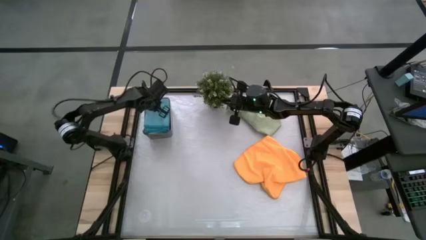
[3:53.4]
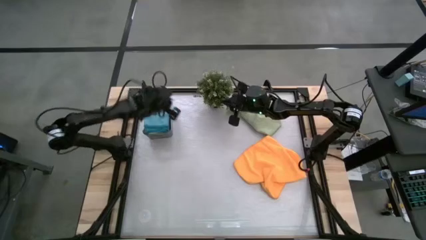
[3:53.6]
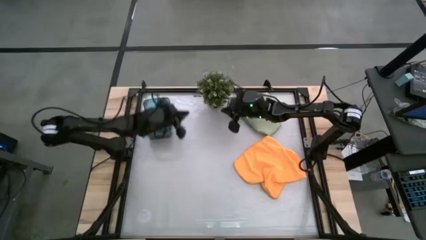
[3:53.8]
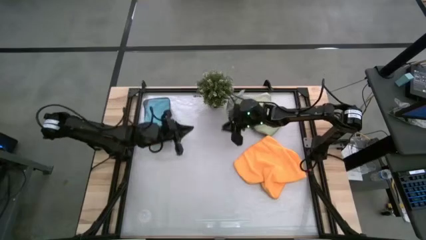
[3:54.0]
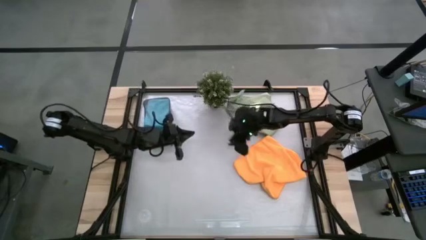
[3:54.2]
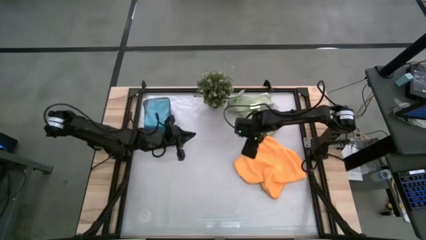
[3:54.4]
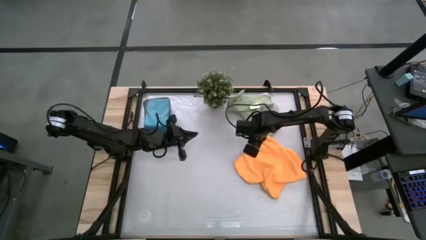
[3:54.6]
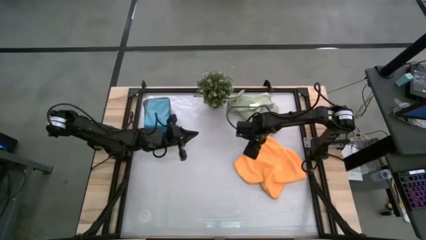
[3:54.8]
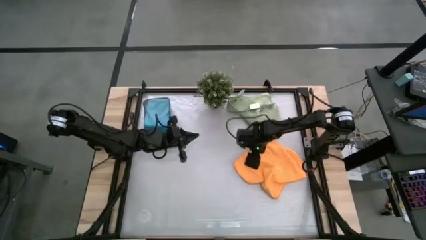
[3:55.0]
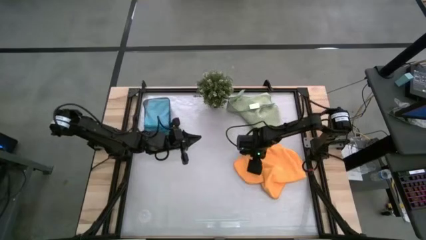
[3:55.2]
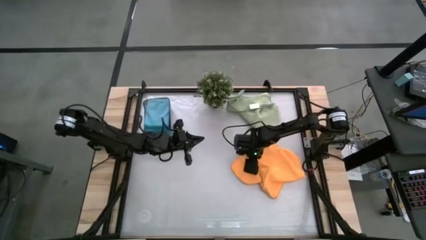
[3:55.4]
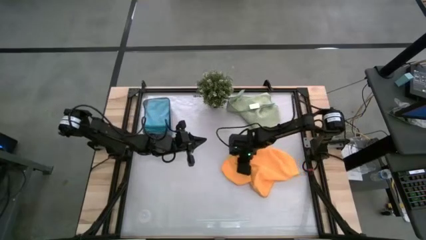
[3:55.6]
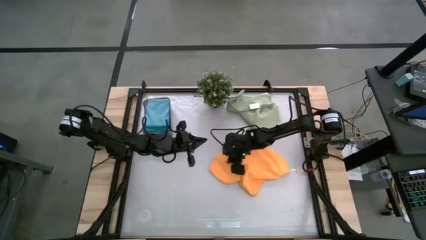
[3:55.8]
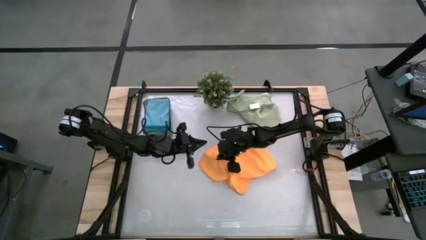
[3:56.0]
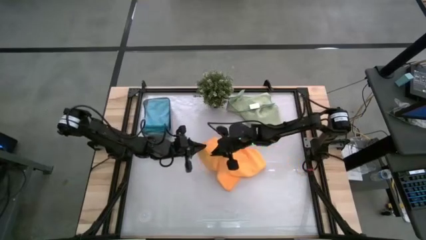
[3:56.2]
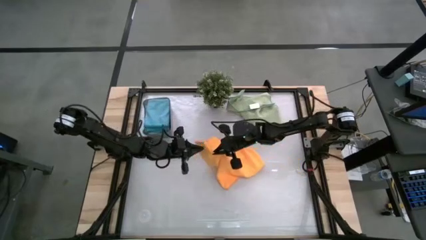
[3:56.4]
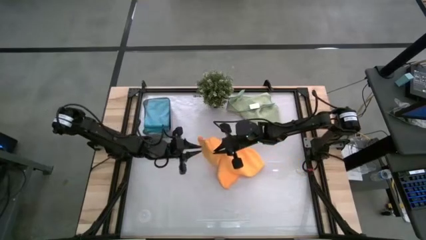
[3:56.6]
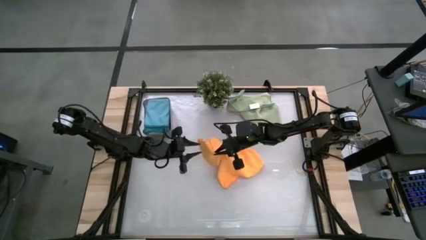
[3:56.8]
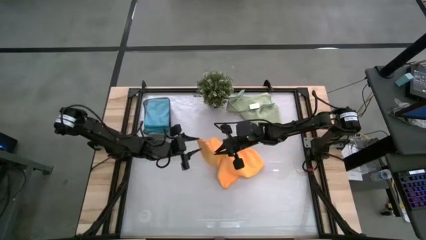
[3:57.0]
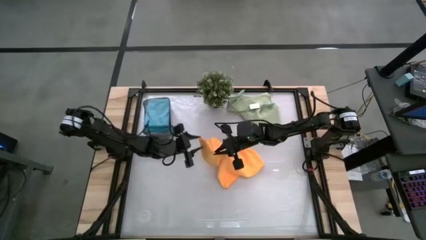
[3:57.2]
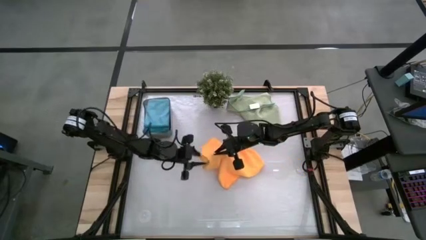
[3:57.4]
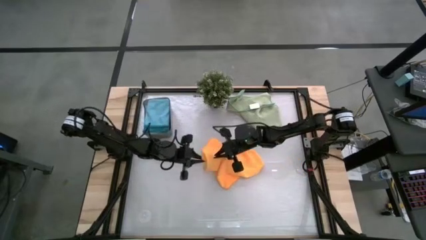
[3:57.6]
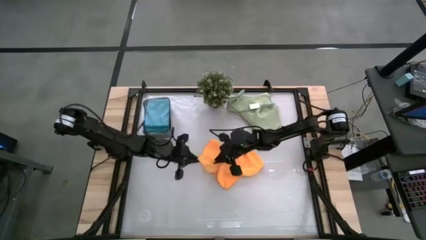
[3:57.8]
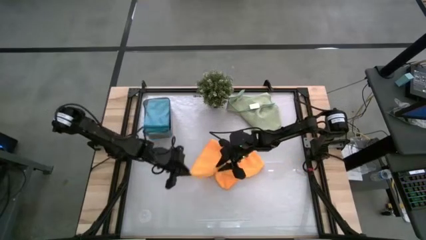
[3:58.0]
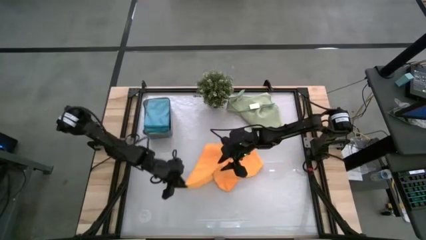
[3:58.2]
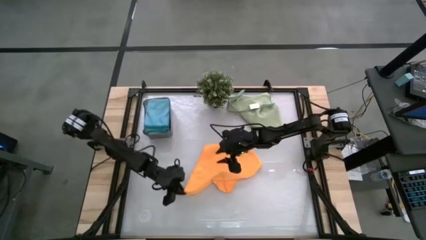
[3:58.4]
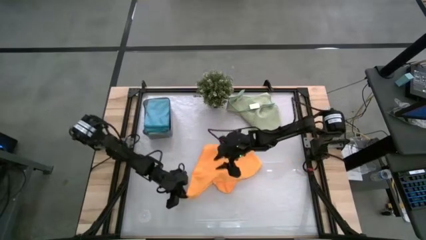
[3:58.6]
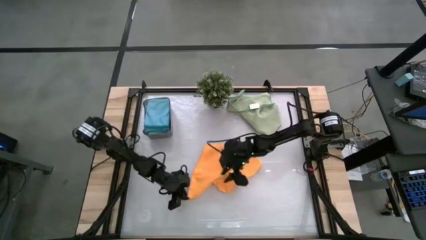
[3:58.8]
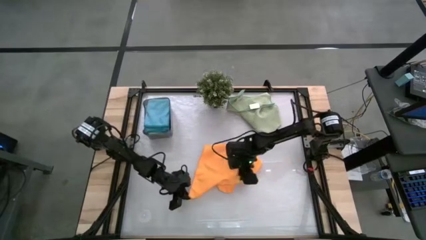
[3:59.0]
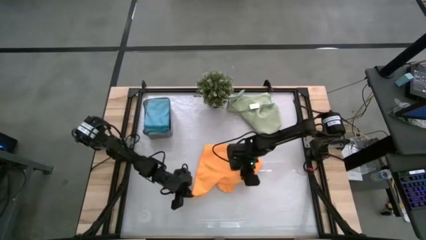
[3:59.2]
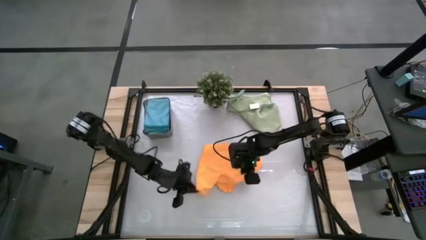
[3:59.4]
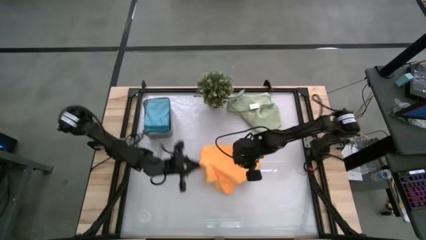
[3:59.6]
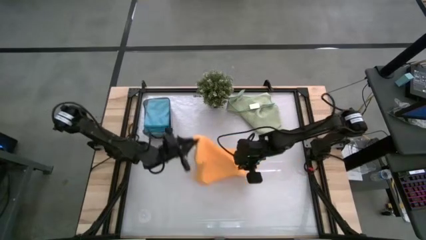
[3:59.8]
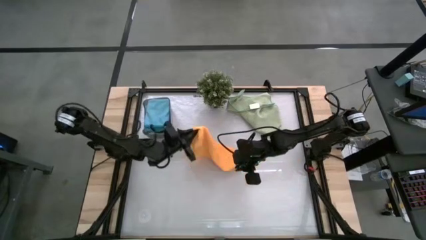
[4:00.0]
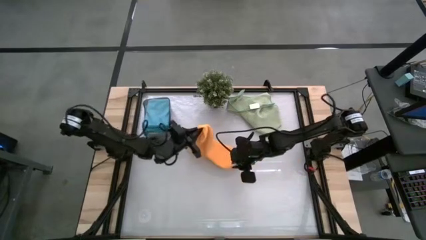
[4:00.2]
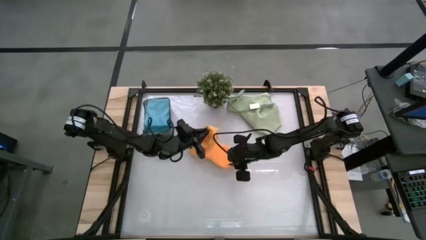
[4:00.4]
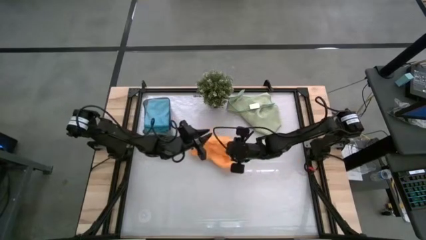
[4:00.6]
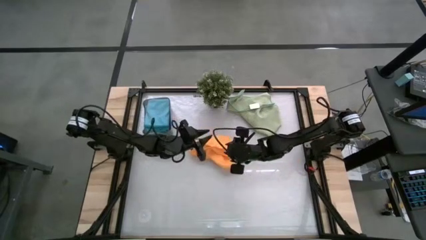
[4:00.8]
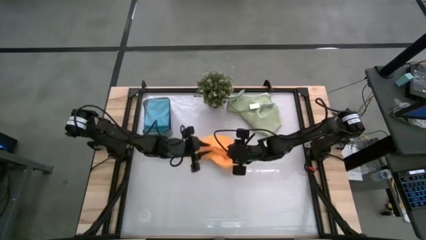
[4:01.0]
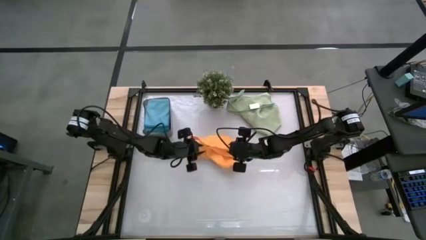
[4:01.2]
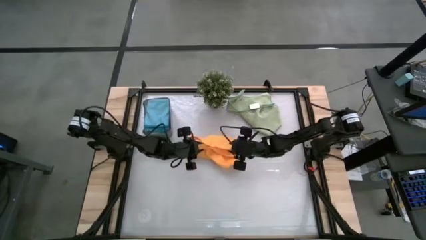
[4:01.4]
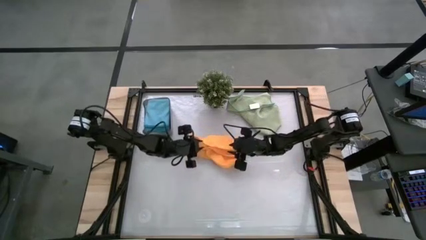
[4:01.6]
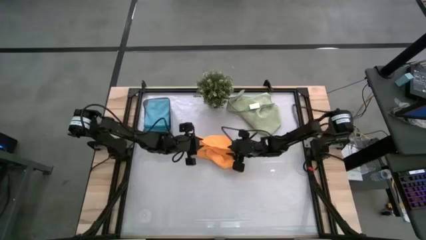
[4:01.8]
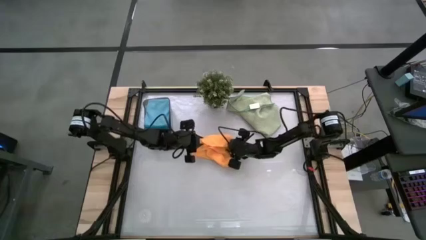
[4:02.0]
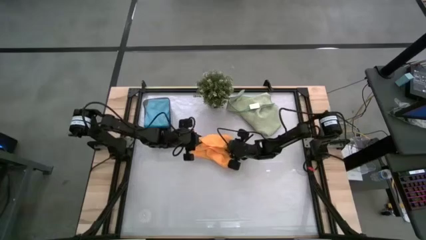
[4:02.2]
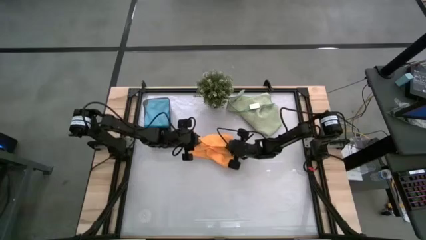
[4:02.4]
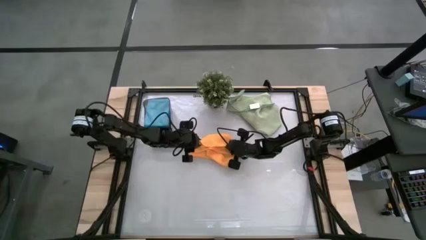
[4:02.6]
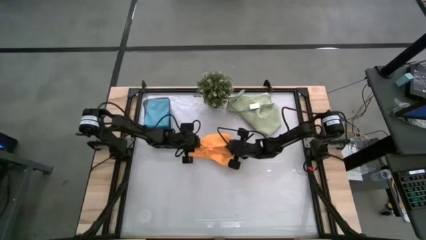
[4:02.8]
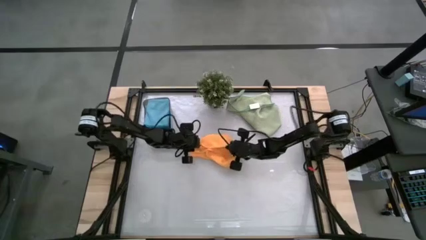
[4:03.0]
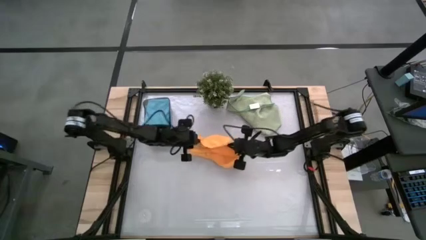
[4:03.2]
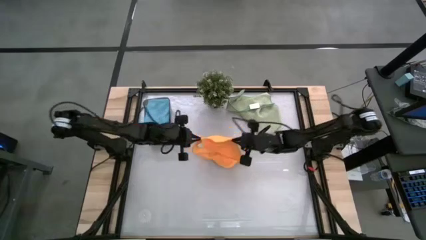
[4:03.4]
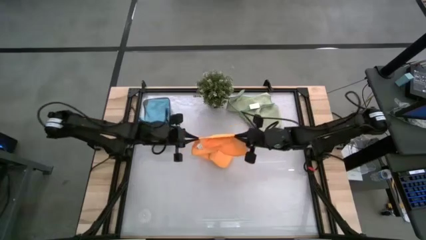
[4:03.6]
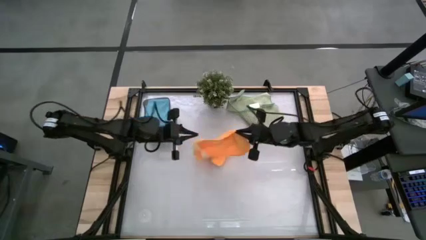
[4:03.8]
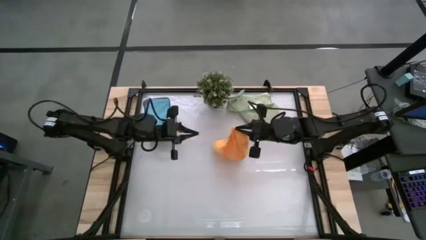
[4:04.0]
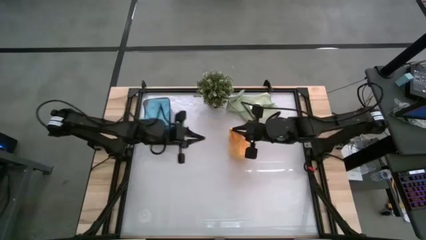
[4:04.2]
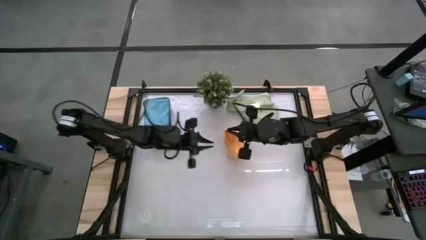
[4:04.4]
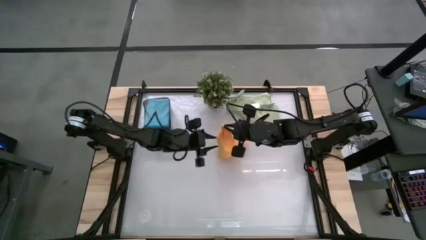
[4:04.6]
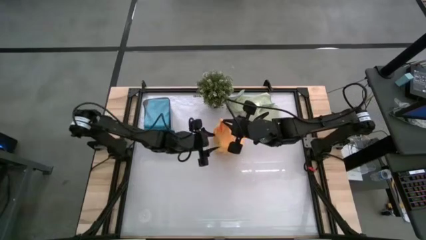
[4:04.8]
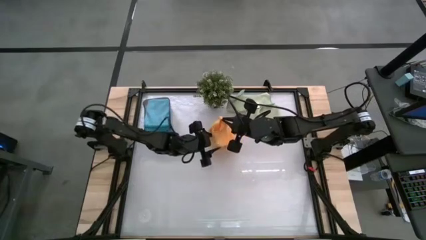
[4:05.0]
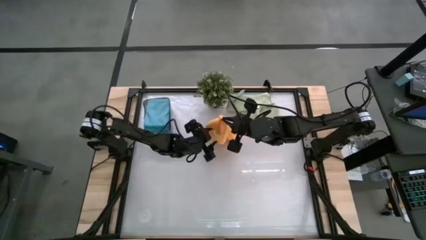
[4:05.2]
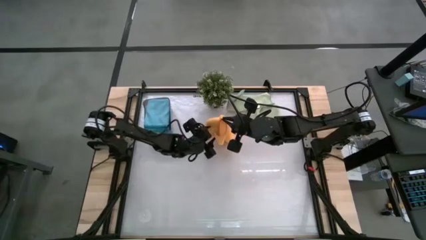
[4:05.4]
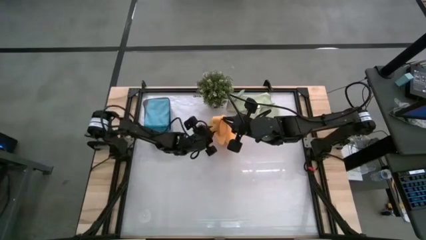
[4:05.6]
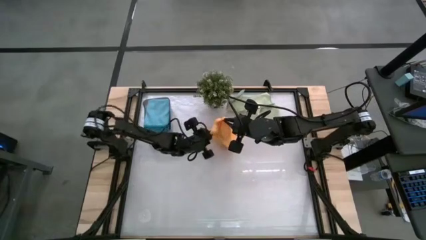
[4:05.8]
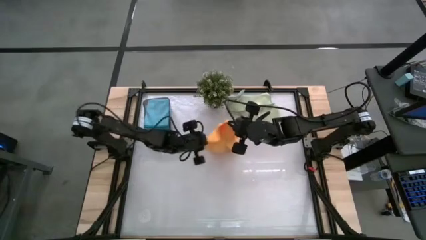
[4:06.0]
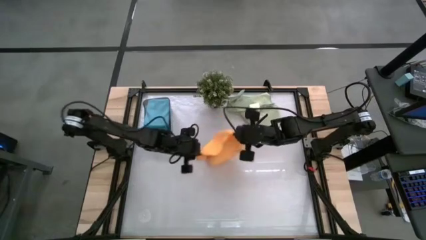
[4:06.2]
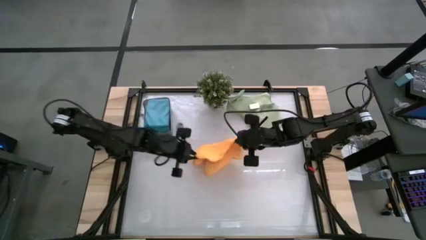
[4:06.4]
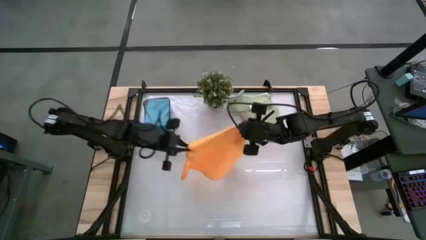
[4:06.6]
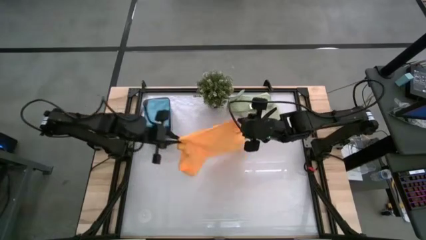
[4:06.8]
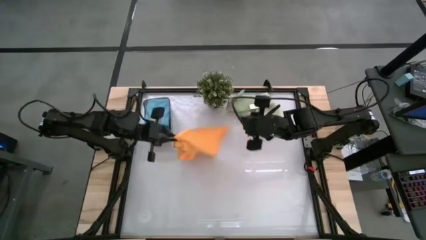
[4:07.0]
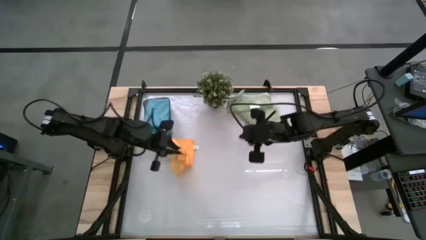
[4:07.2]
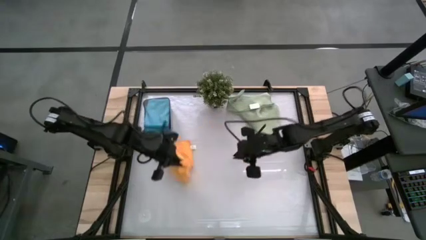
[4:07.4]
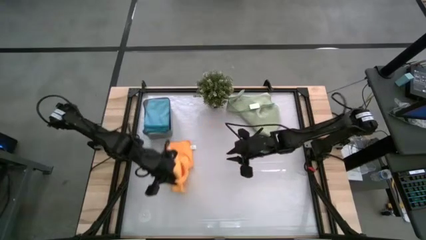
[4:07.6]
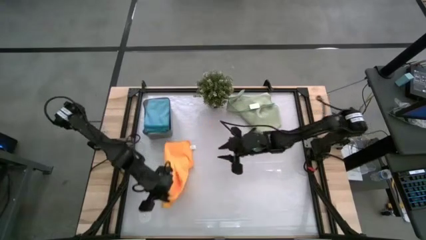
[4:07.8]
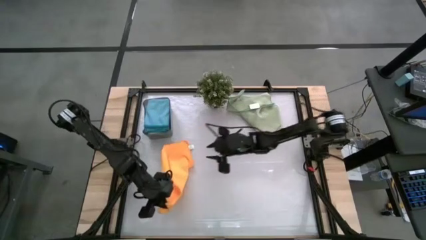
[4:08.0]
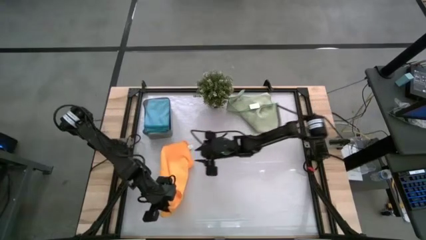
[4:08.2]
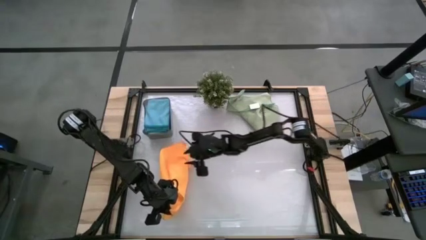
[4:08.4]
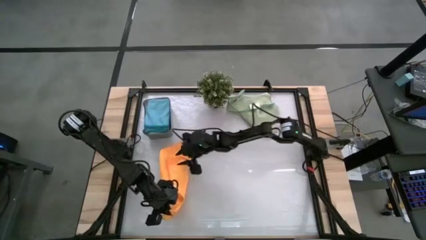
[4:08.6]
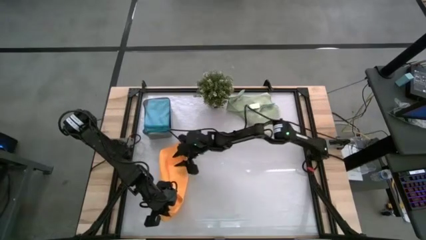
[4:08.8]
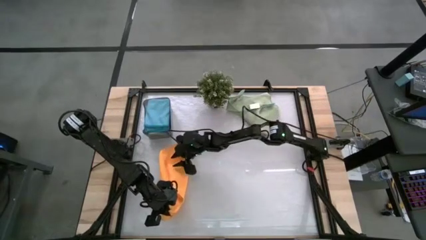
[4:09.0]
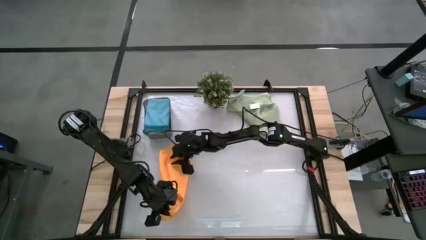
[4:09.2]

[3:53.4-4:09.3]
Task: Fold microfiber towels
Fold the orange microfiber cloth
